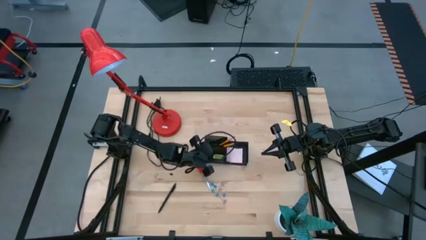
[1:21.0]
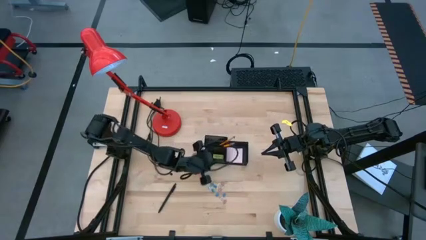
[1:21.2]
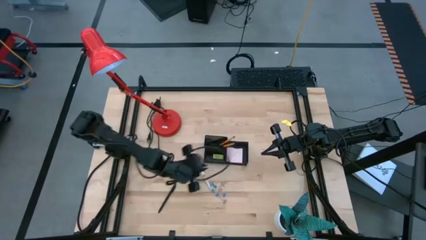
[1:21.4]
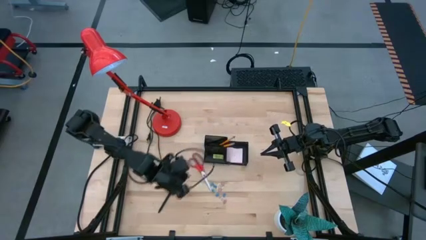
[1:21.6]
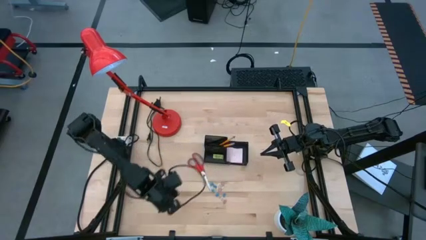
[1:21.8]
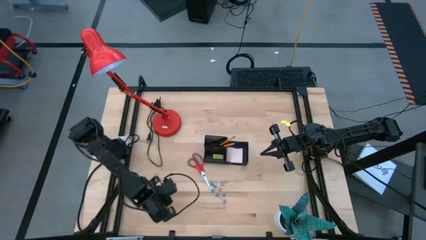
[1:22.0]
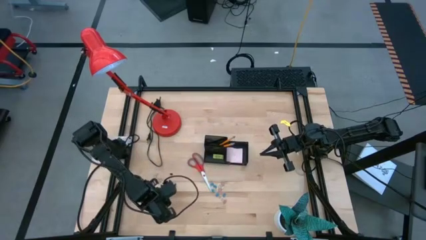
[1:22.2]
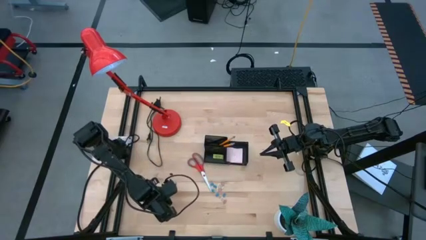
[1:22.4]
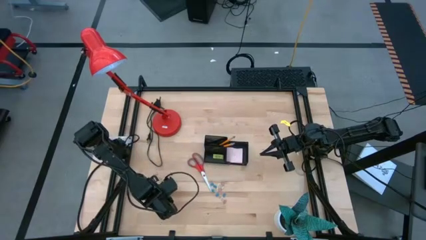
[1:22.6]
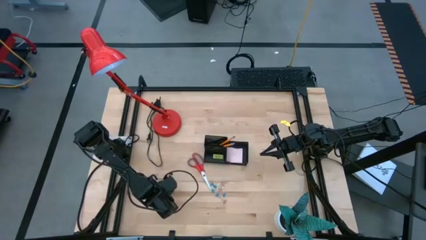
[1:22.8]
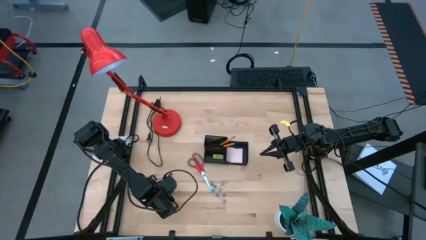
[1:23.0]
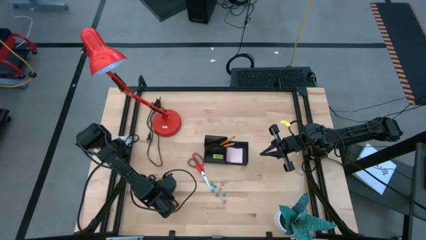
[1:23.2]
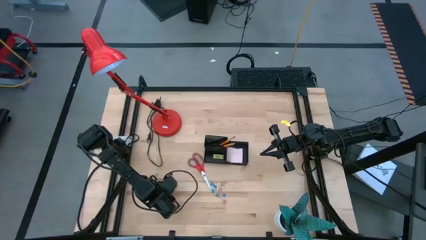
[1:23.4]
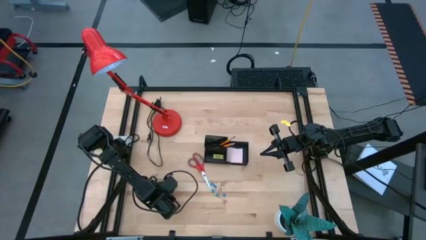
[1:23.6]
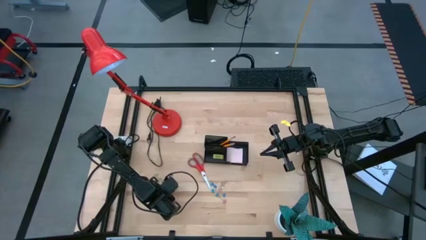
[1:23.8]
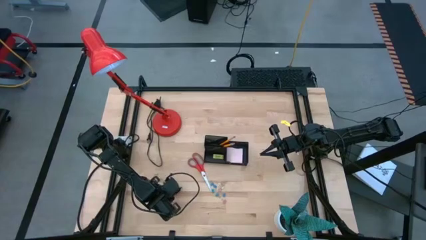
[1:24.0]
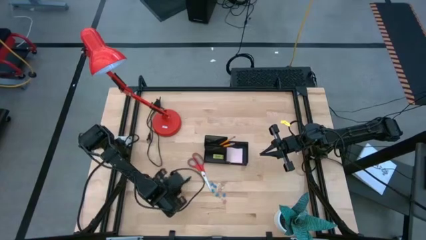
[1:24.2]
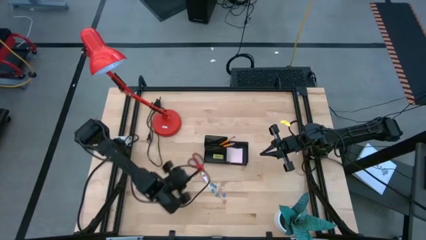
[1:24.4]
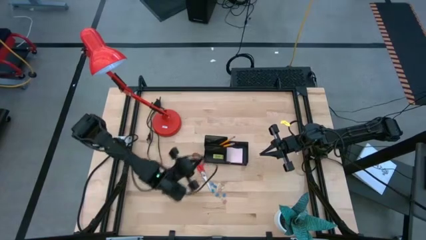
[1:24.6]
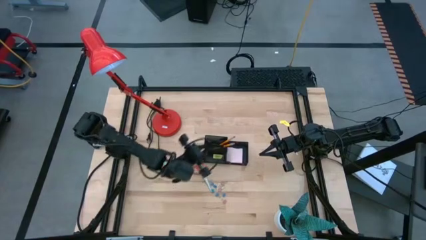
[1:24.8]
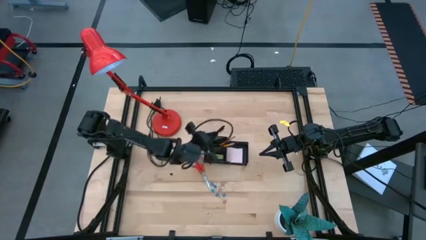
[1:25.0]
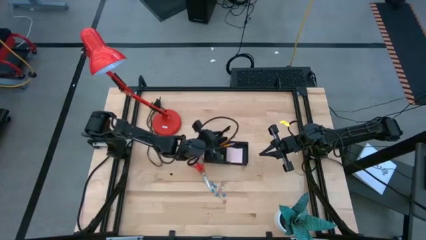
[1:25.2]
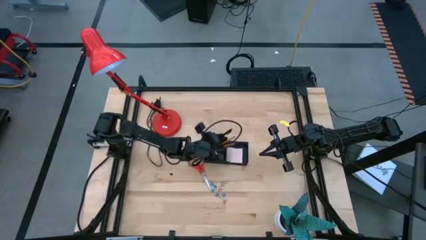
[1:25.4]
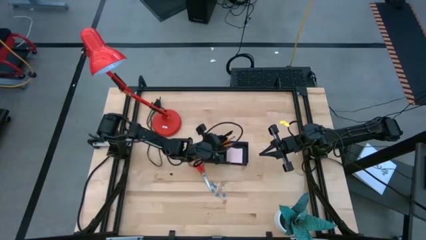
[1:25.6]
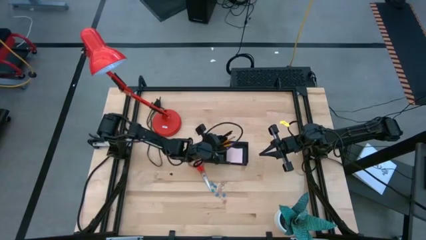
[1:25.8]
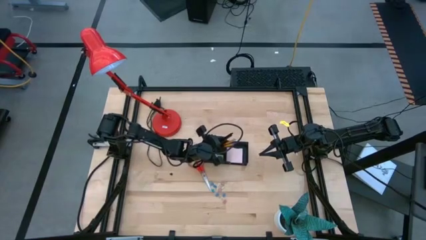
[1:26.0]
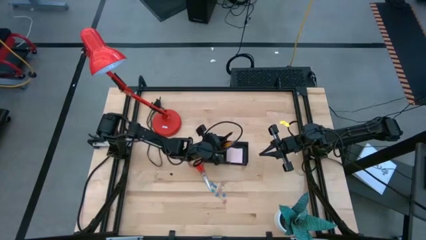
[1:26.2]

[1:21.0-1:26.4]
Task: Pick and place office supplies into organizer
Put the black pen into the black desk organizer

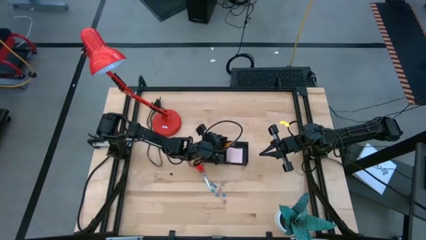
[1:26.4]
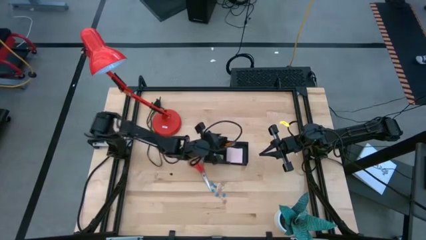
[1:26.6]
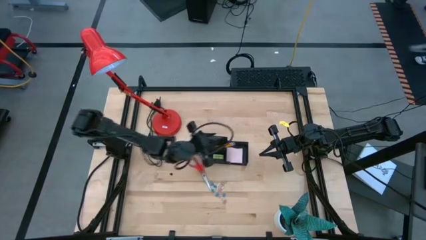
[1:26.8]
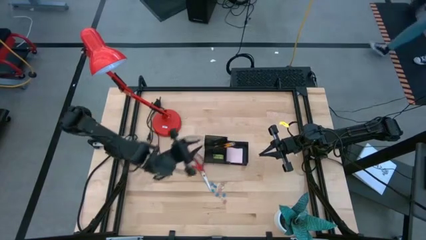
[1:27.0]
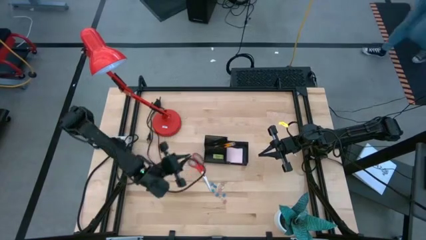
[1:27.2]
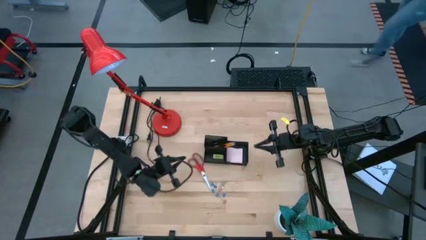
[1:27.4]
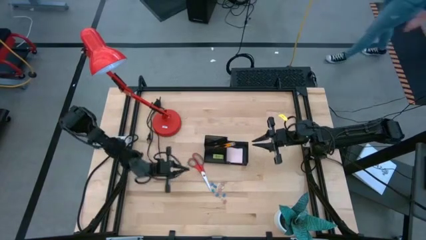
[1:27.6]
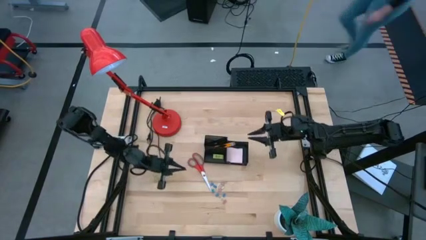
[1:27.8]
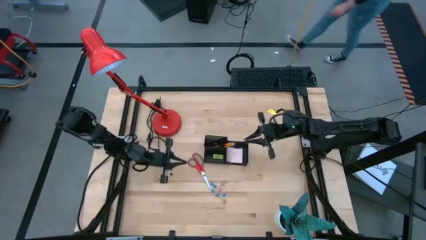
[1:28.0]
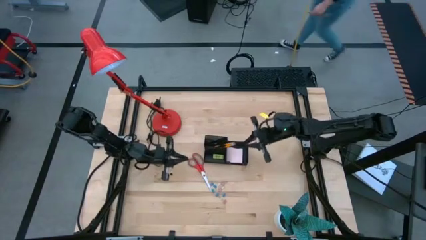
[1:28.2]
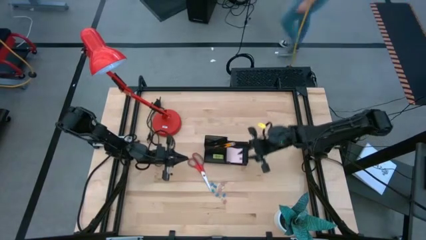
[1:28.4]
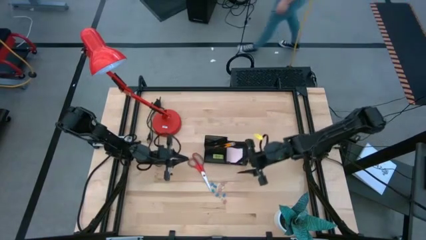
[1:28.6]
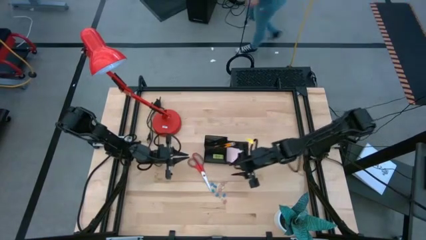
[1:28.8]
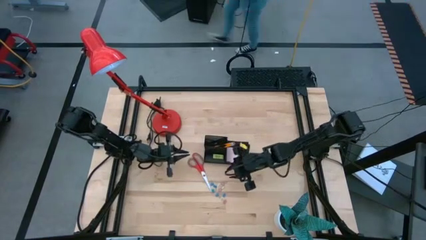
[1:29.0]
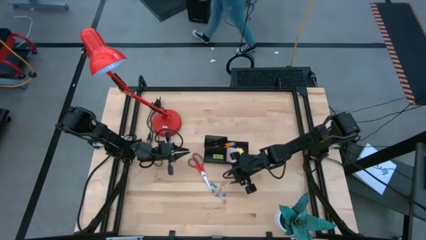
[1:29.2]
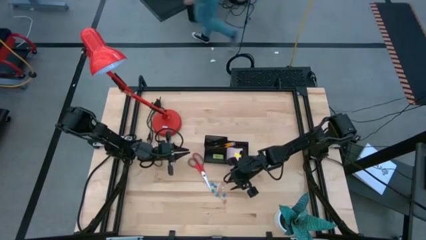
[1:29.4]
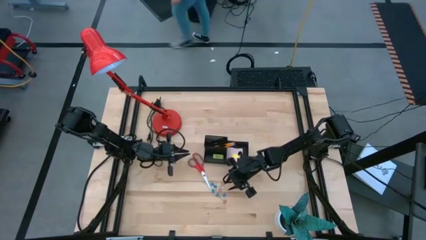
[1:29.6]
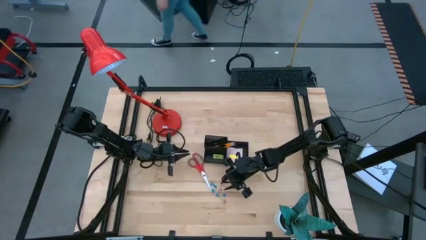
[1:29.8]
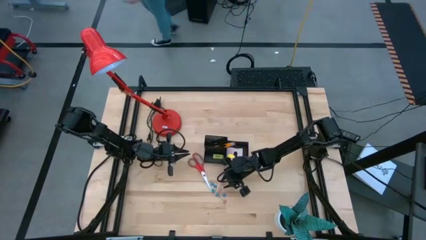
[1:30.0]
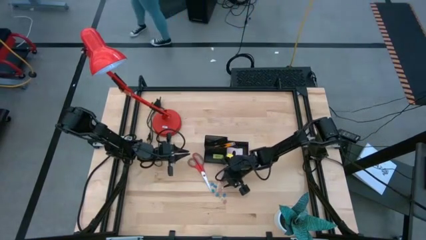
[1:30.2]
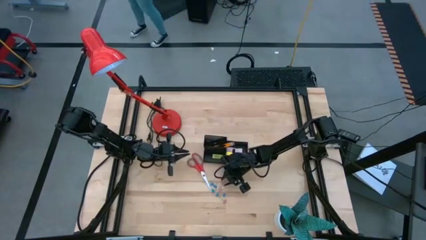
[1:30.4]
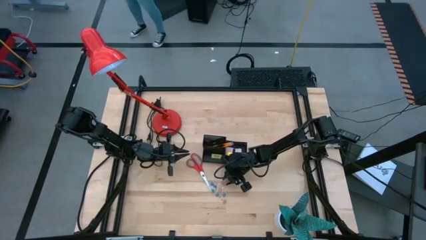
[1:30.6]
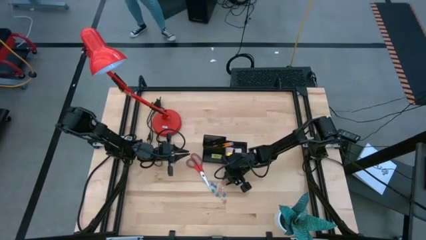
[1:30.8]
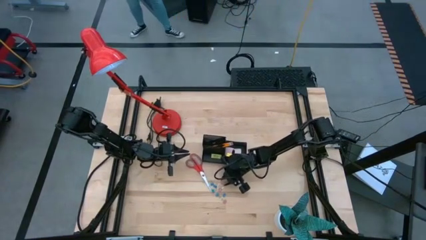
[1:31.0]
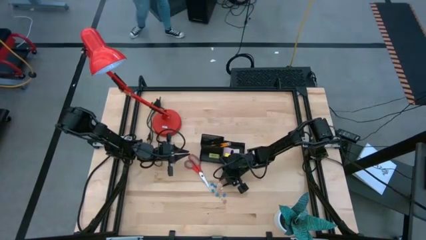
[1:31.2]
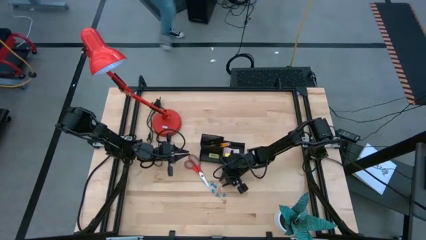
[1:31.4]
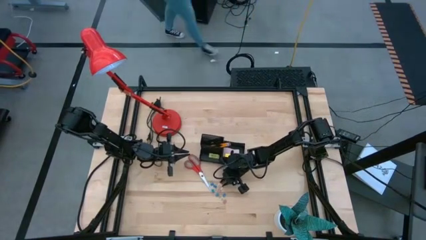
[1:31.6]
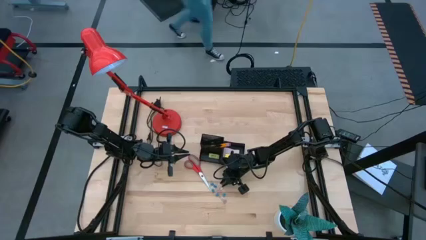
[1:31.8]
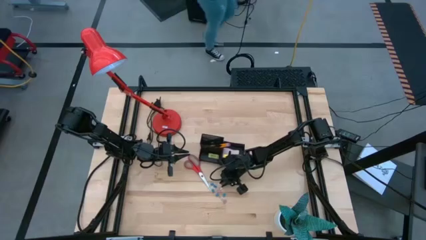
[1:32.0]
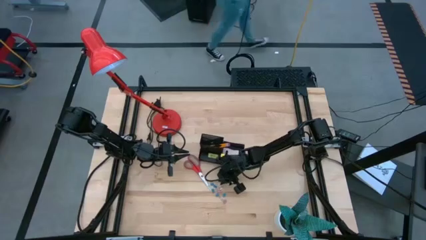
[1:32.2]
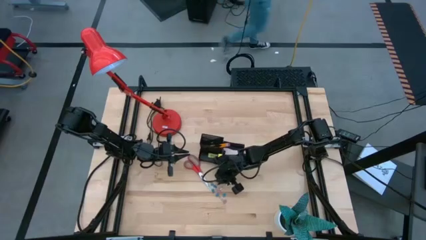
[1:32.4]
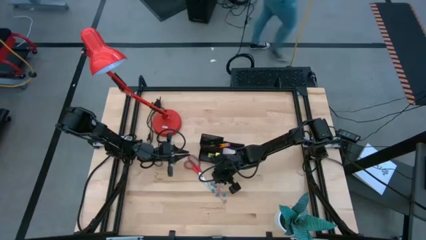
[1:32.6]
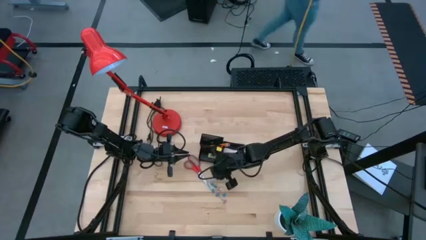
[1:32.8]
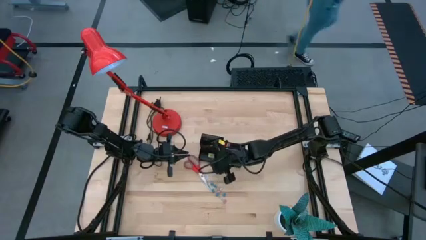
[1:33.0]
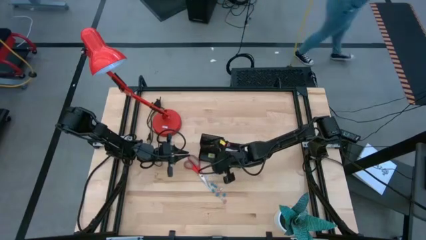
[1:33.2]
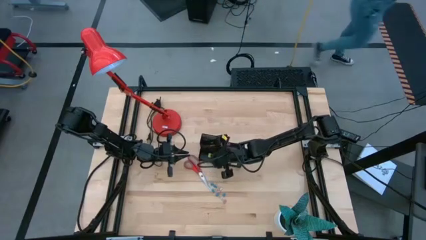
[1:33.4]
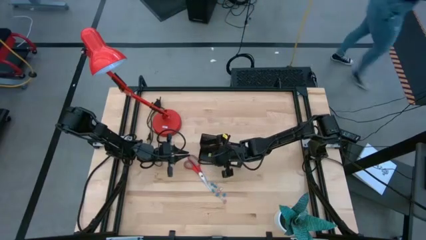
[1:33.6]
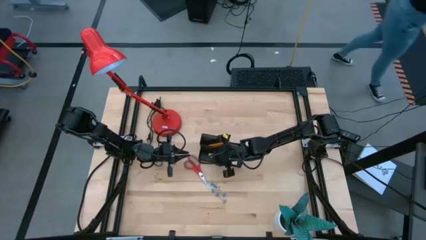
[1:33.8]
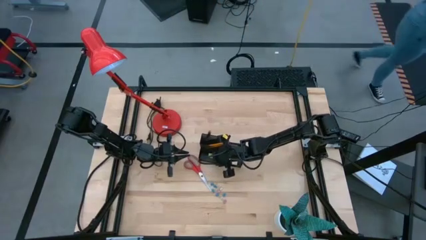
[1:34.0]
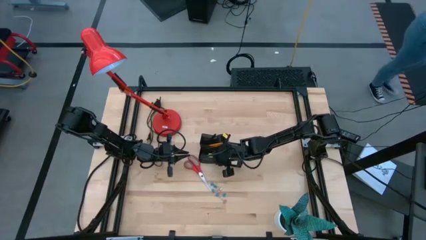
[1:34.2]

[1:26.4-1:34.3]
Put the pink binder clip into the black desk organizer

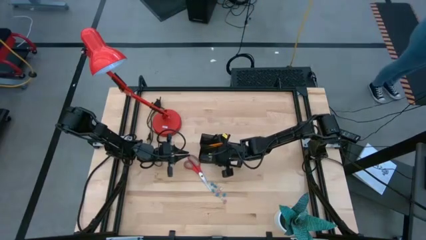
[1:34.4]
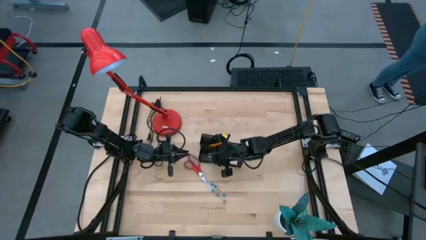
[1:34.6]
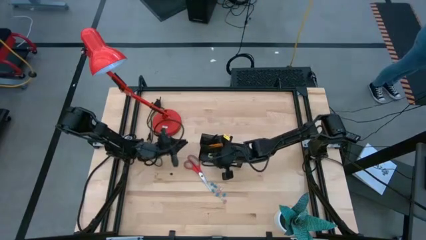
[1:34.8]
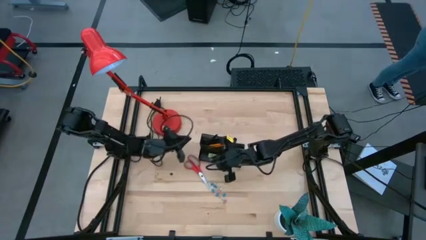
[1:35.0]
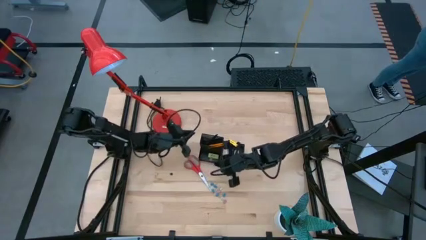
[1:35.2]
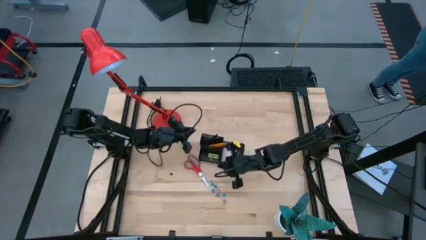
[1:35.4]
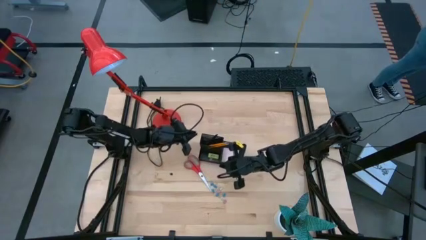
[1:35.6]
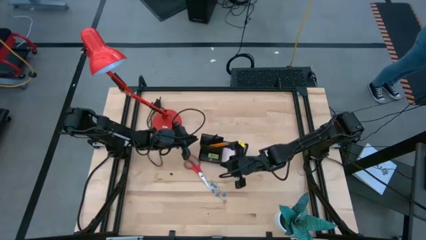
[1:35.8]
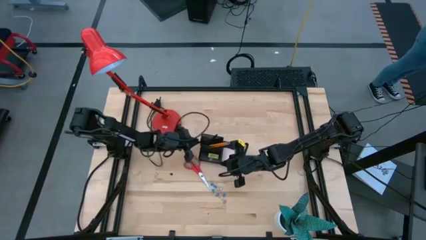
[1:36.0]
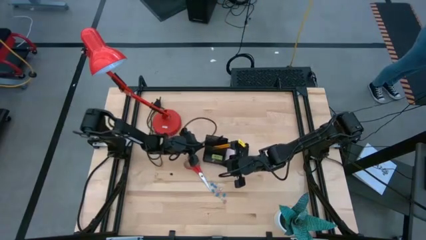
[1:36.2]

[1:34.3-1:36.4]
Adjust the black desk organizer

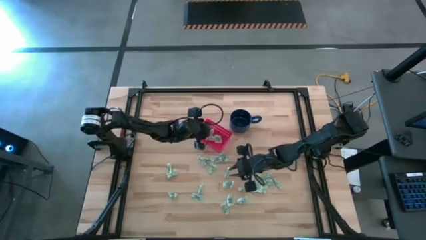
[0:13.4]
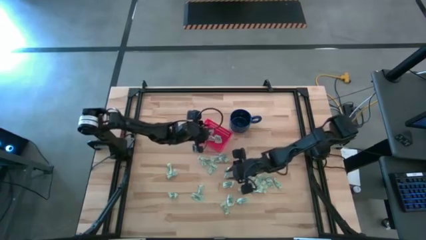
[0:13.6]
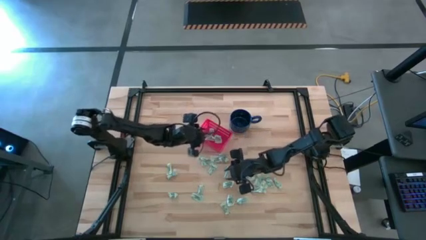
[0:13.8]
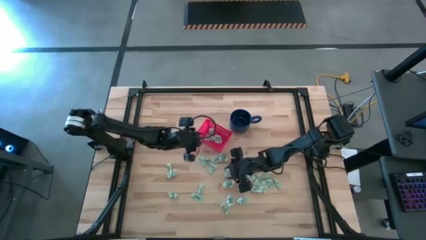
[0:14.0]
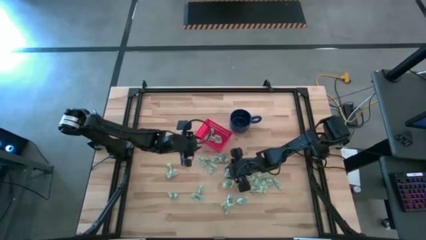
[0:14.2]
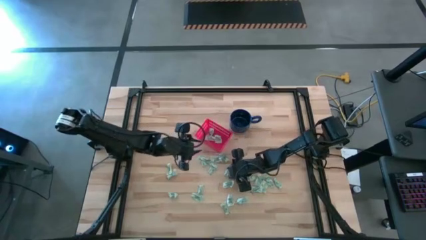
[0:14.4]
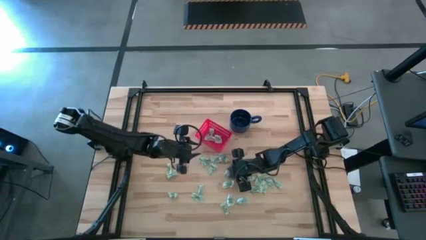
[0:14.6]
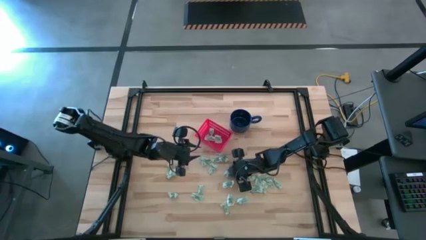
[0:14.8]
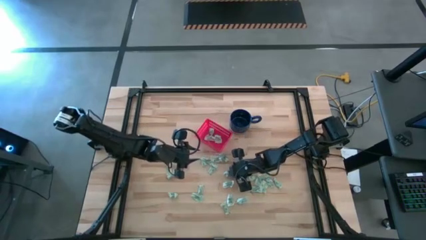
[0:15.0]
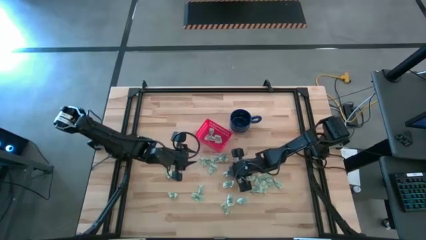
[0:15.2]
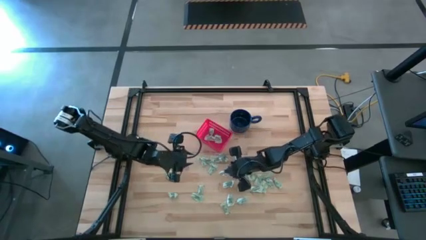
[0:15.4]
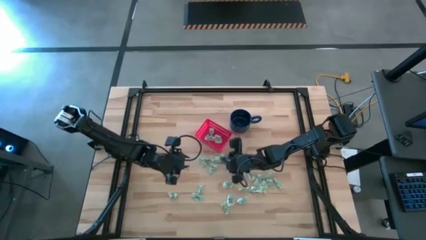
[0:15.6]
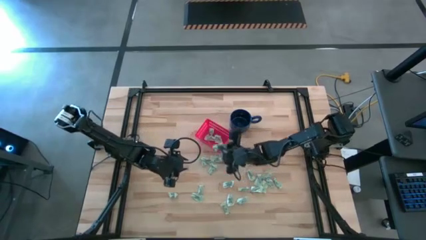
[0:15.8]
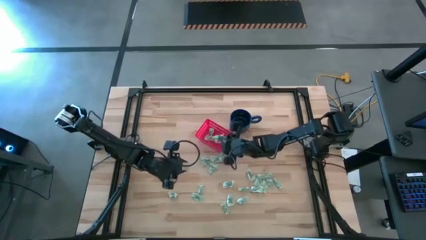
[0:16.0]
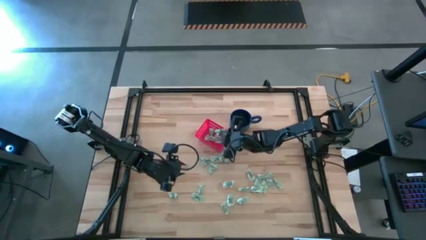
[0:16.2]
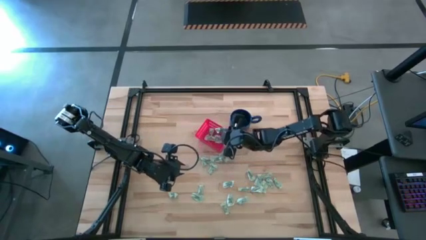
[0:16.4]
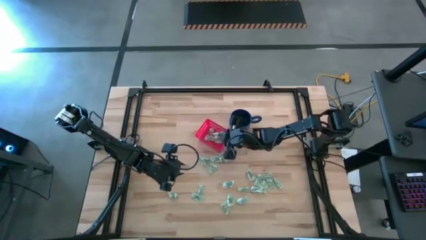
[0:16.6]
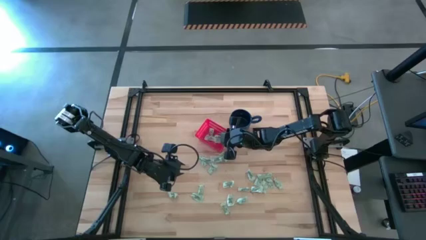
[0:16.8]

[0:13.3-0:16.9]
Task: Pick and place items into bin
Put the stevia packet into the bin
